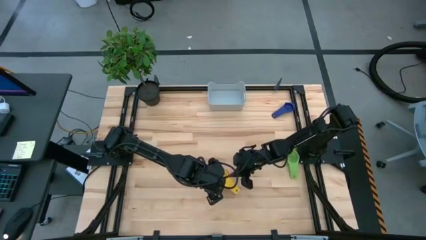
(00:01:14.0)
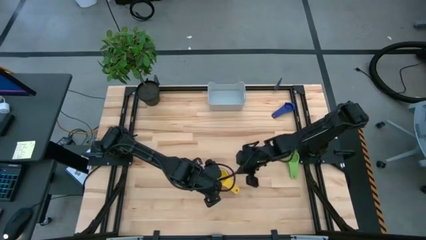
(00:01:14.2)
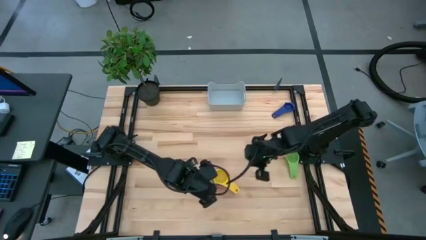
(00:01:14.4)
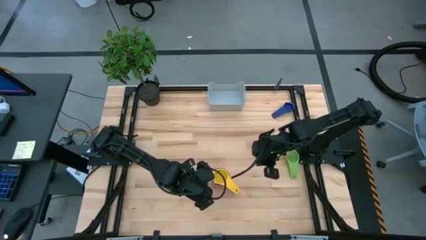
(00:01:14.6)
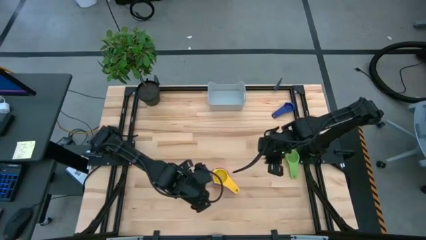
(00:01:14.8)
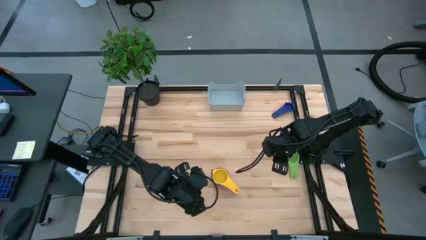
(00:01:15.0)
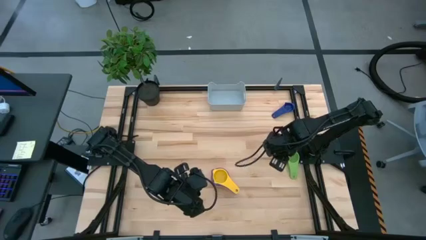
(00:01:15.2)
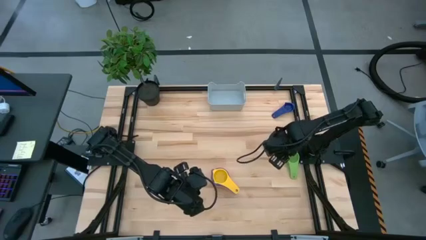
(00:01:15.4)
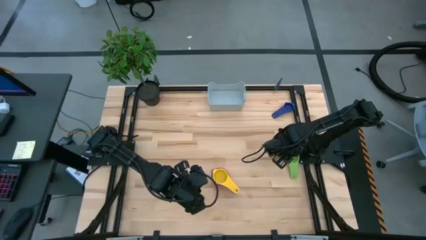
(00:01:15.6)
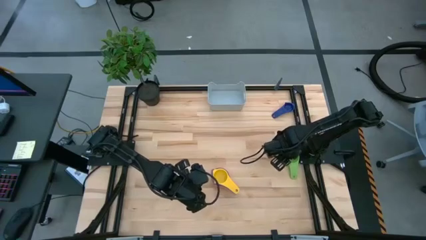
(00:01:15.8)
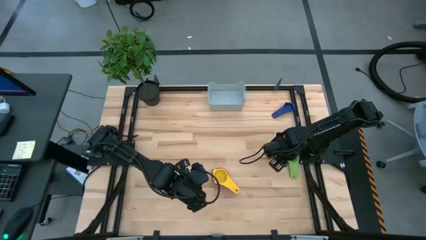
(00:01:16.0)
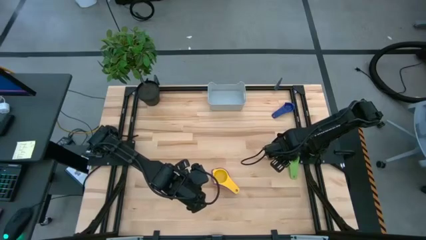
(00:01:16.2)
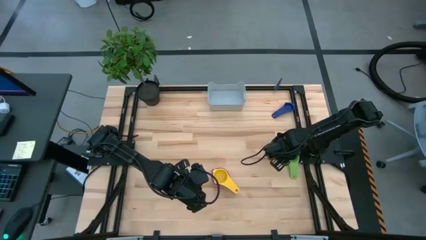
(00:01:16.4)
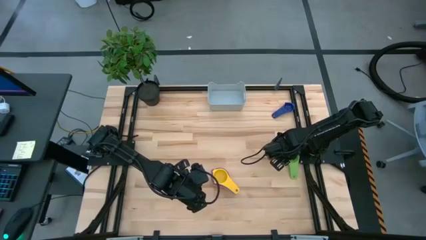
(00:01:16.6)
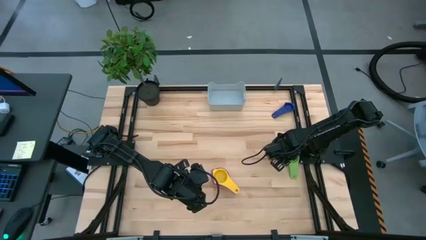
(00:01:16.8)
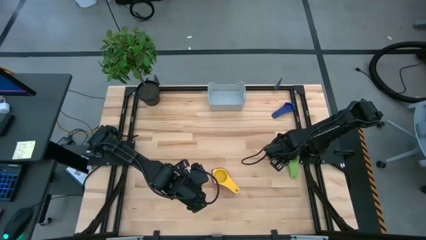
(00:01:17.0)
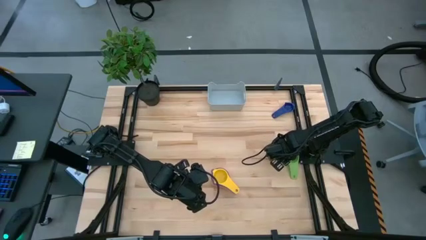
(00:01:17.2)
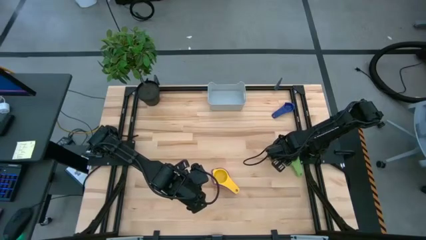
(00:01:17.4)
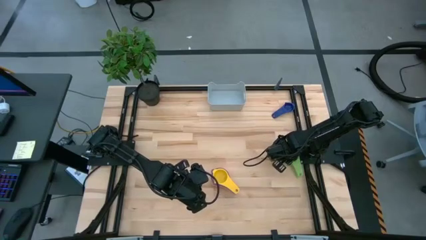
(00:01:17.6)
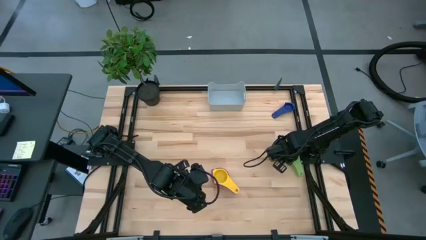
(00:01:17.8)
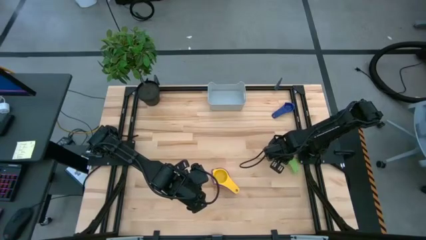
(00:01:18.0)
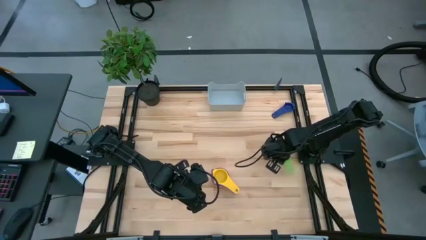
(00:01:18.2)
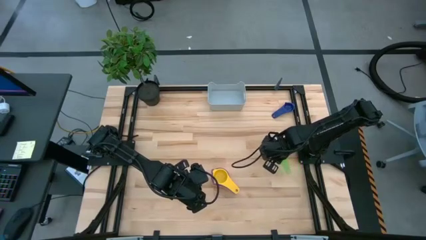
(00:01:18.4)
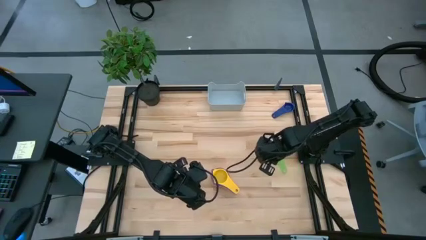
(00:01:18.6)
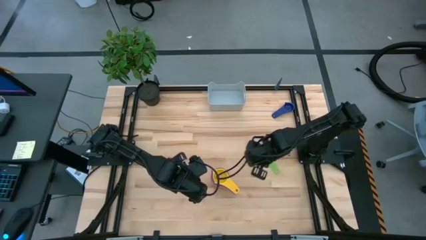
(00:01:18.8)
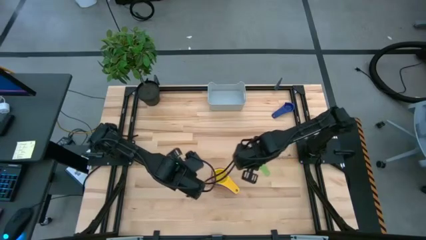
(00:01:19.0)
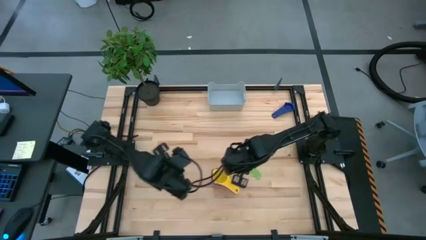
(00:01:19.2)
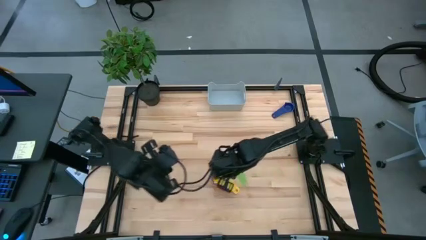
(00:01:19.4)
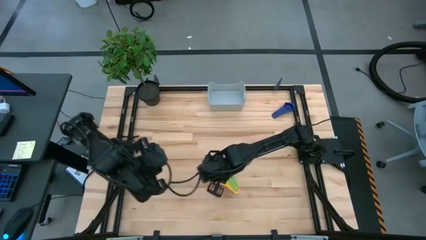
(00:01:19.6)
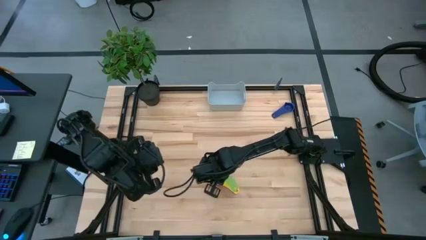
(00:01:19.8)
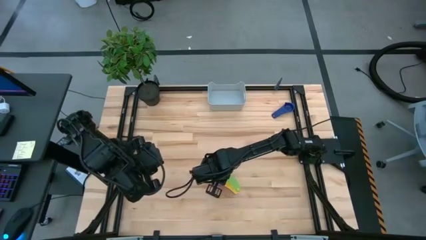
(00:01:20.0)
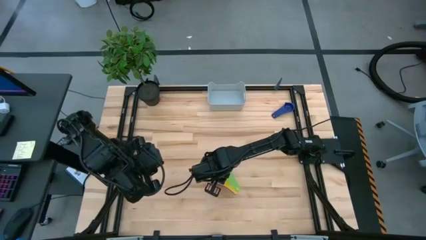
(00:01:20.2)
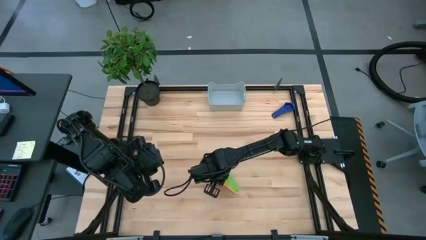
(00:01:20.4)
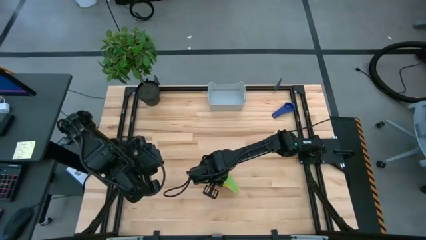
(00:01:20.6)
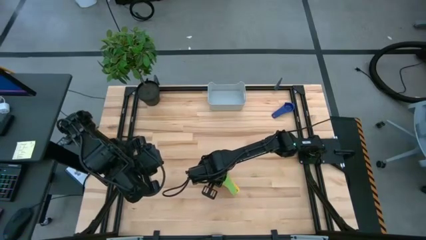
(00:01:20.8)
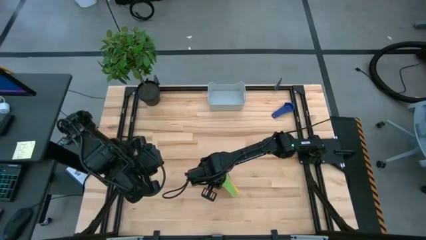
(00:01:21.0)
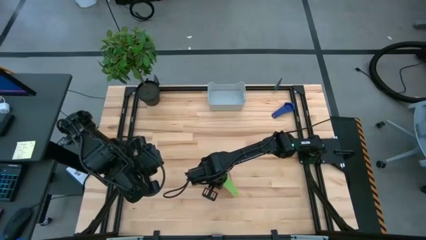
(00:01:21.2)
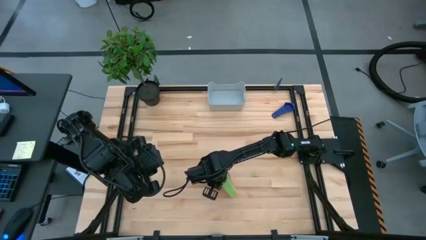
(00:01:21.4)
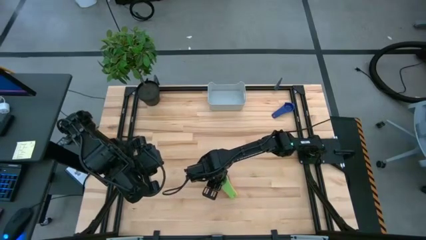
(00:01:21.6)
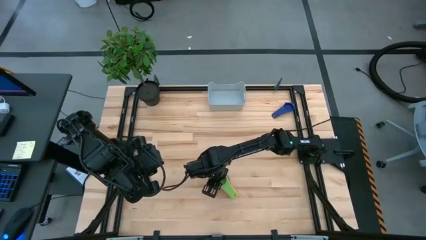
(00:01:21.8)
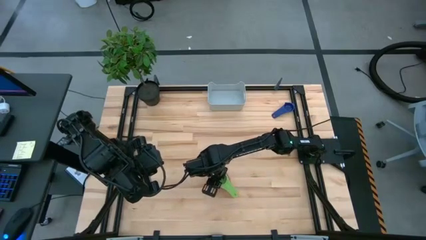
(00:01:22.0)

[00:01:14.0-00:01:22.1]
Task: Nest measuring cups in basket
Stack the green measuring cup on top of the yellow measuring cup

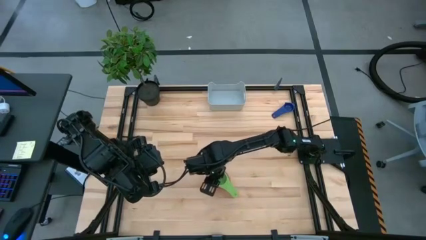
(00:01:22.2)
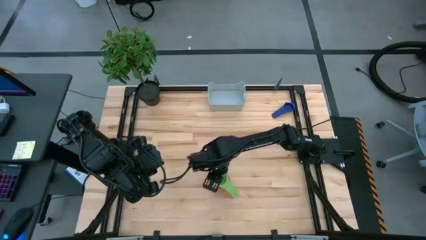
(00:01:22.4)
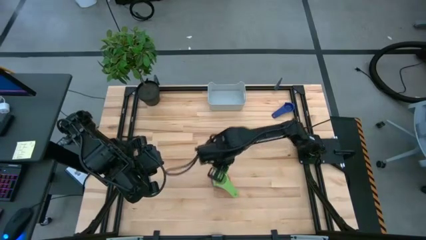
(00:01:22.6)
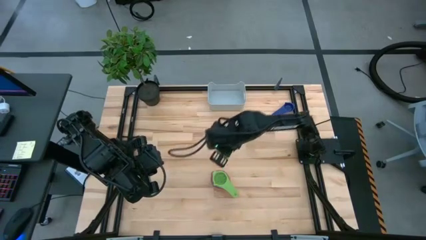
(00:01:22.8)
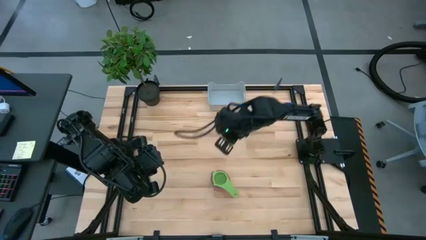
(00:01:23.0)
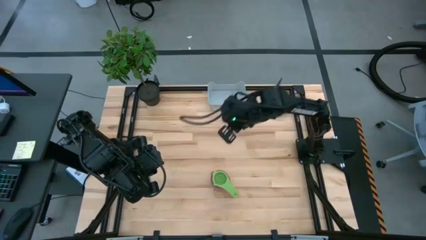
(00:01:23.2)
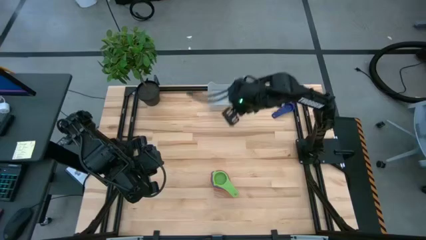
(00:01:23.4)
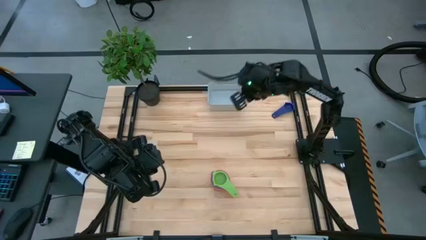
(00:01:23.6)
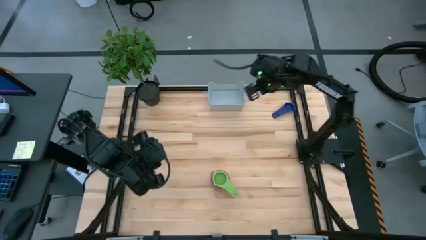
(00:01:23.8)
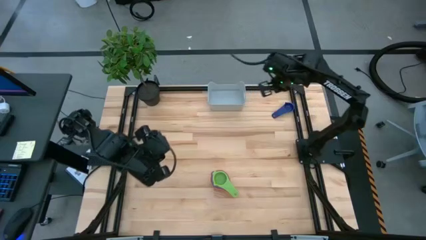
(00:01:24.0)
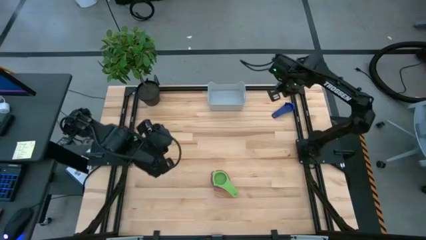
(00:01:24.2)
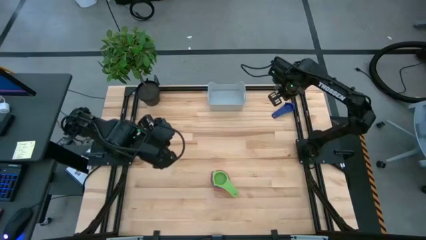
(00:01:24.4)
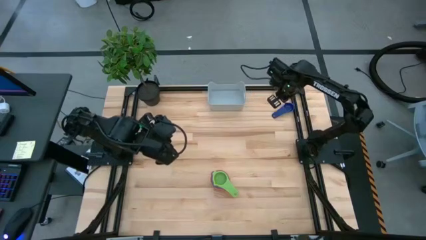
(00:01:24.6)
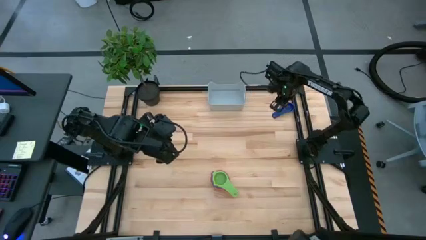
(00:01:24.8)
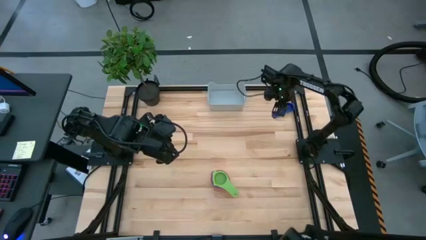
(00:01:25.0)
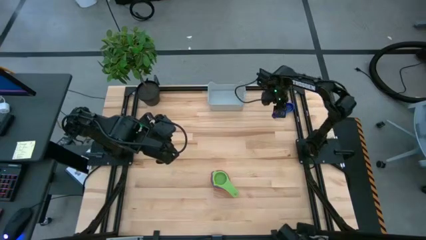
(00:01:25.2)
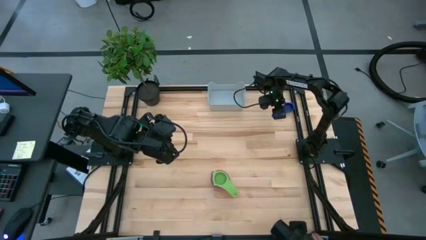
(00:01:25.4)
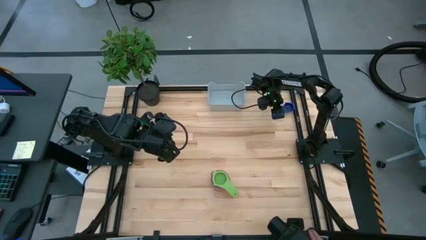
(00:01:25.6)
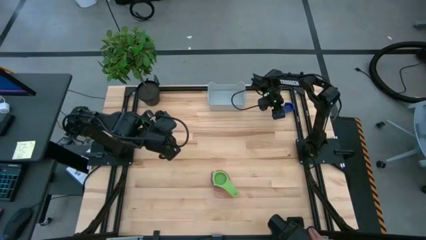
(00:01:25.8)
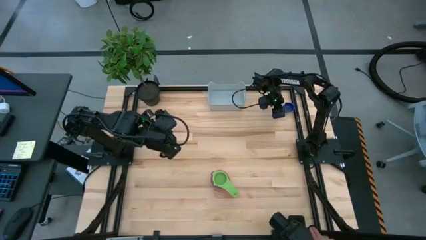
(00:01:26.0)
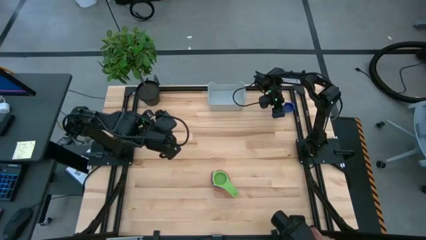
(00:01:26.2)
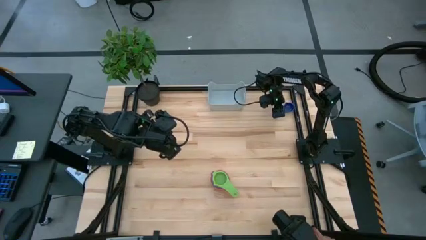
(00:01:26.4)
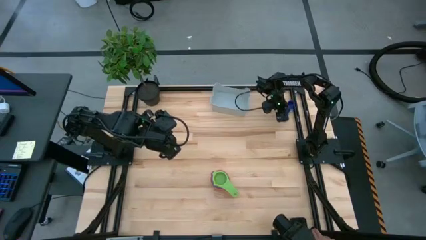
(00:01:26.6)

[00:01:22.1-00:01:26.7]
Stack the dark blue measuring cup on top of the green measuring cup

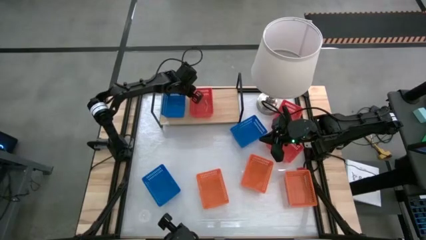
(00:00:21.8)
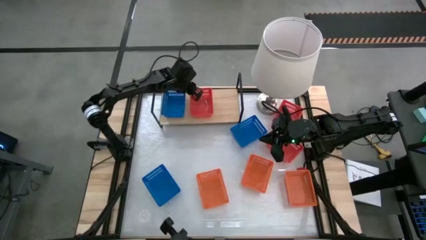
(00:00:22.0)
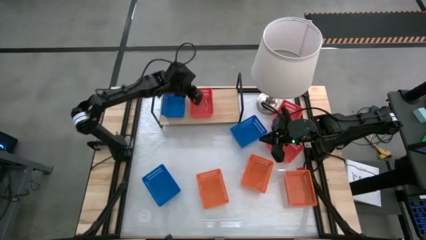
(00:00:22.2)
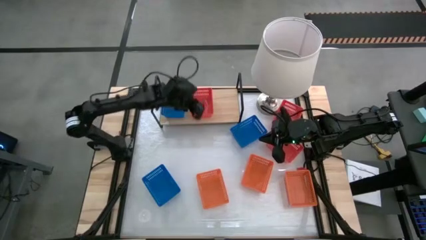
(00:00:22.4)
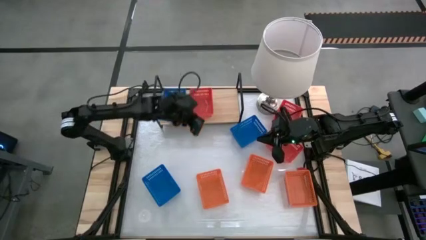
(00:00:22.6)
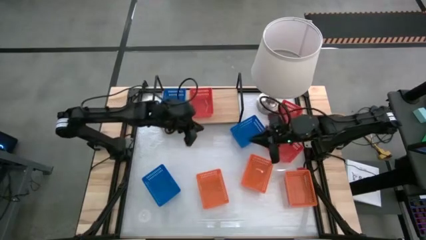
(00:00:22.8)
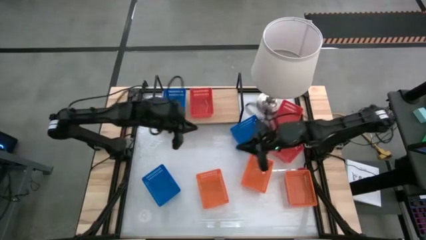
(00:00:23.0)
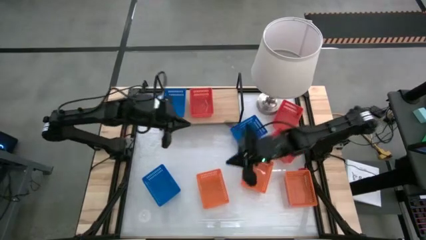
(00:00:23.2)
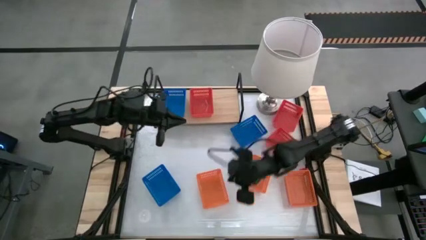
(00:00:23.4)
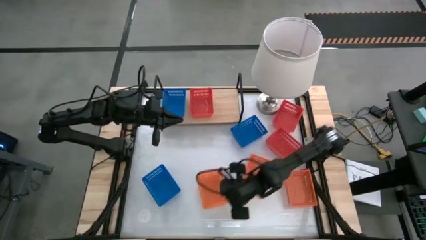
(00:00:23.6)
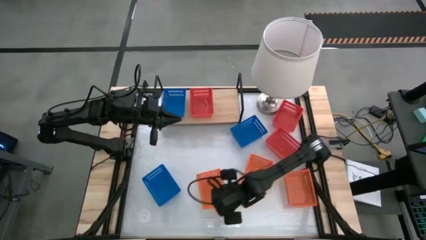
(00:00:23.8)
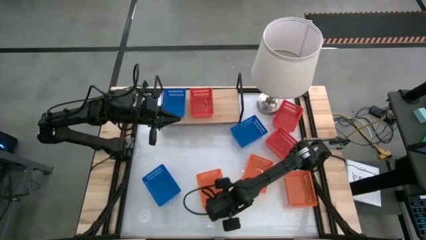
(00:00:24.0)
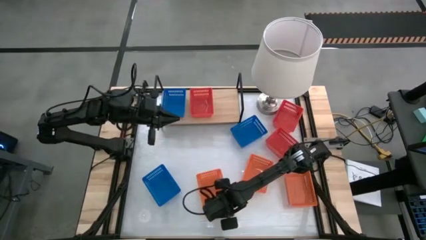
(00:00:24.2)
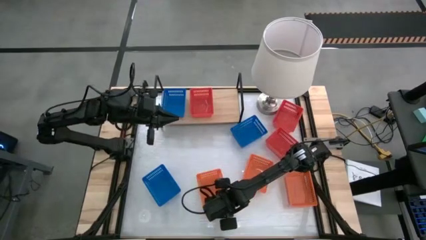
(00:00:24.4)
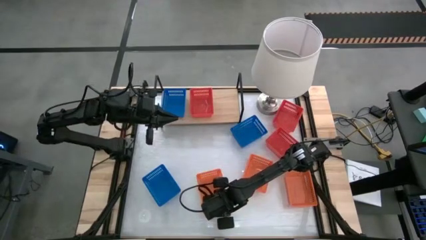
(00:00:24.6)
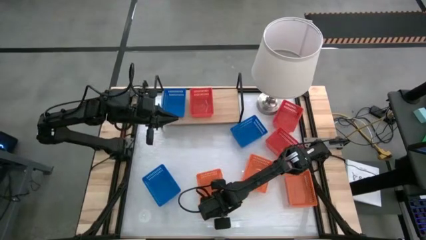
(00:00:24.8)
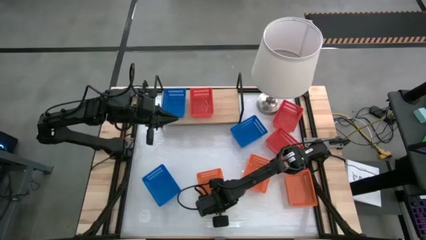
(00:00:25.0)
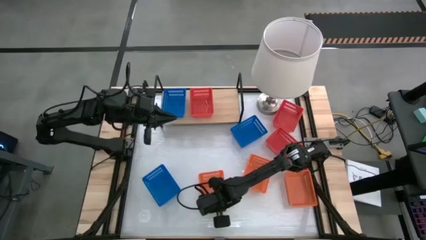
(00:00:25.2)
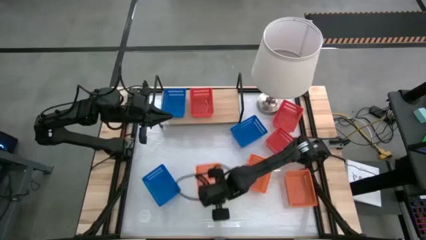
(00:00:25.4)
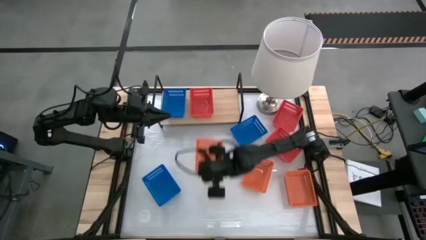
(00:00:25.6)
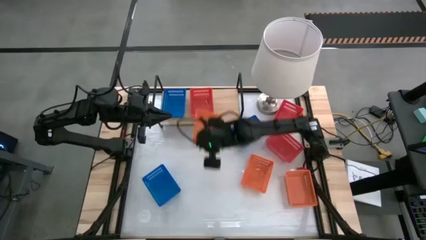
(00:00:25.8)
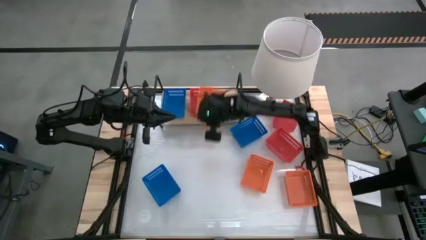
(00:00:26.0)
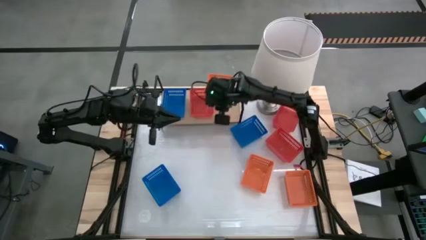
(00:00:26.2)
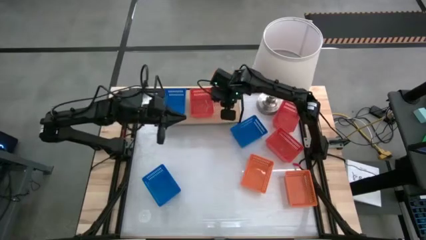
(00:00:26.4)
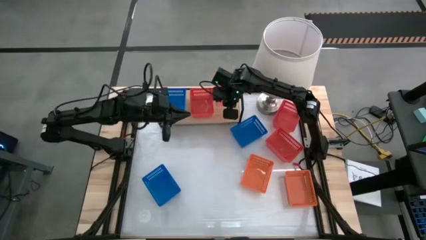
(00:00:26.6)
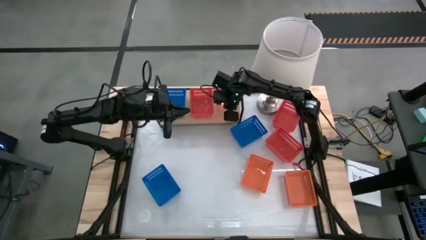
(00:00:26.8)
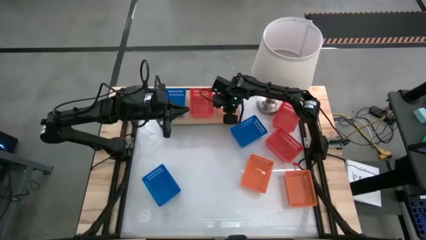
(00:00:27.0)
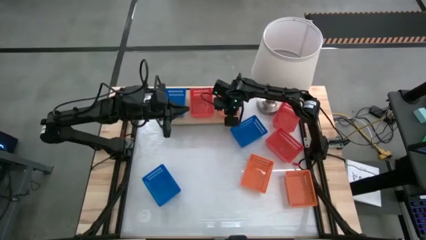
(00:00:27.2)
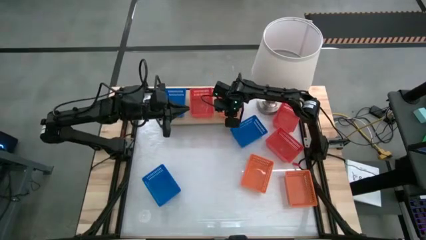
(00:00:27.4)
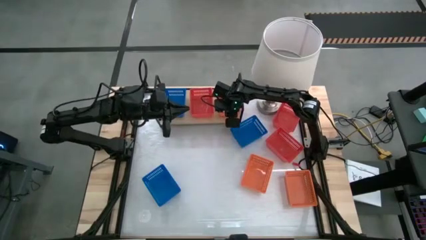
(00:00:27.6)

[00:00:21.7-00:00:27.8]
Task: Stack baskets on shelf by color
Put the left orange basket on the shelf
